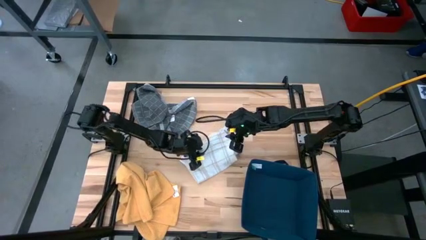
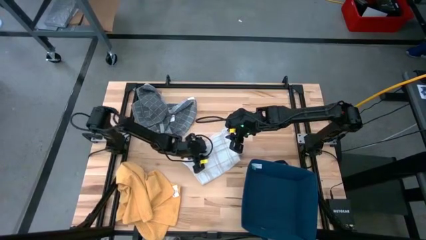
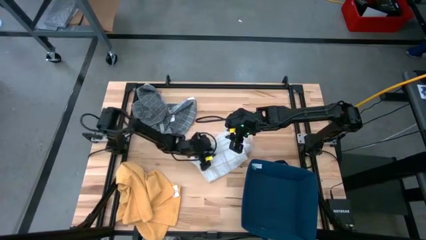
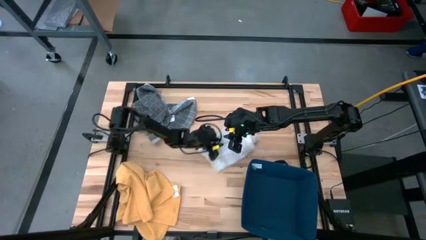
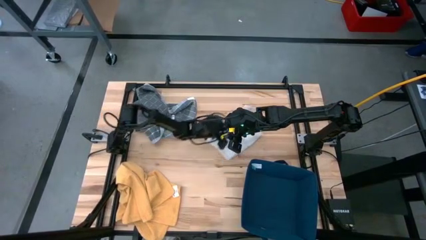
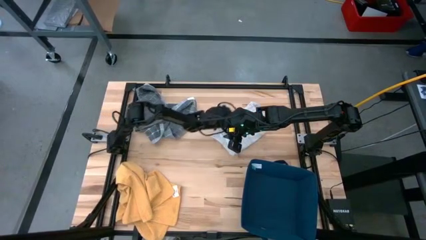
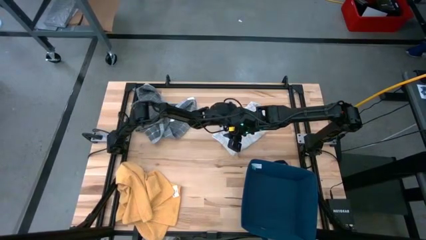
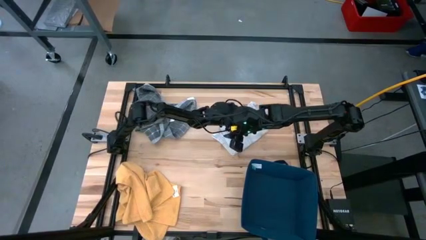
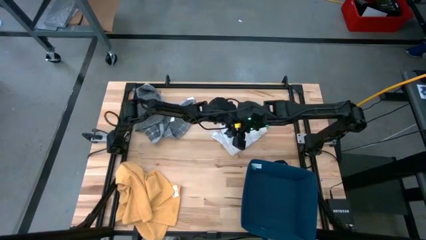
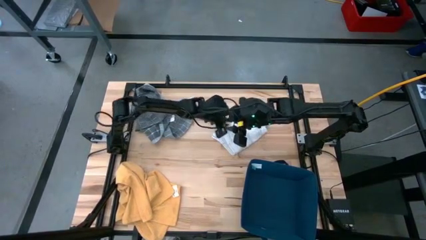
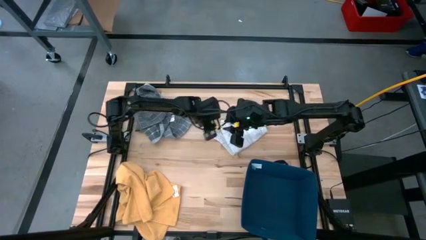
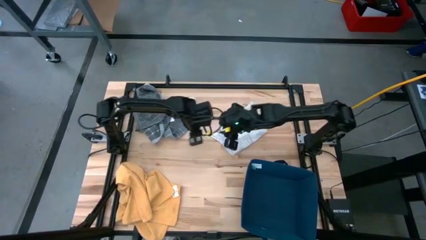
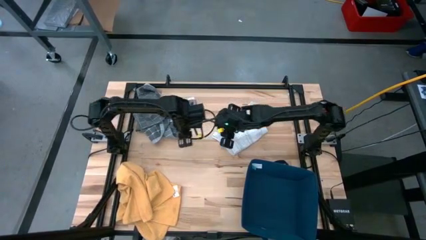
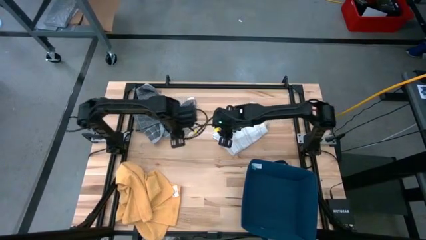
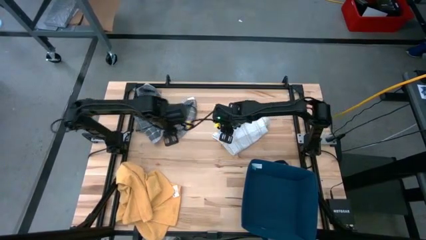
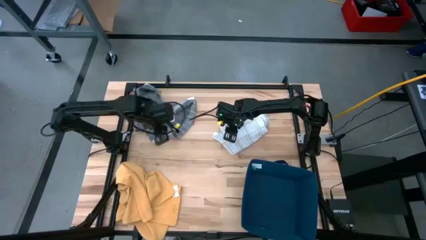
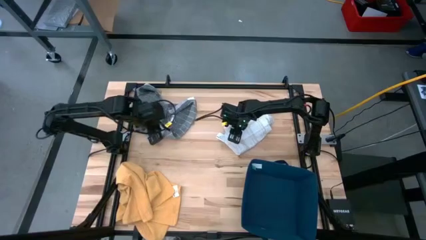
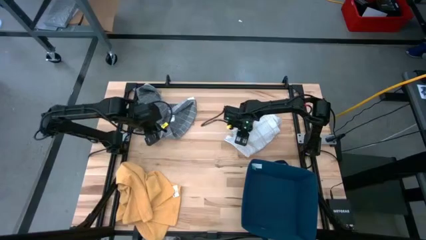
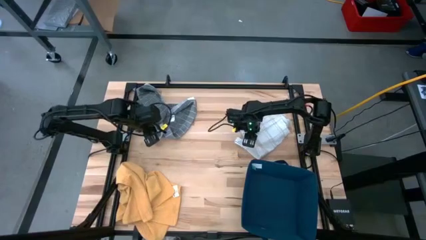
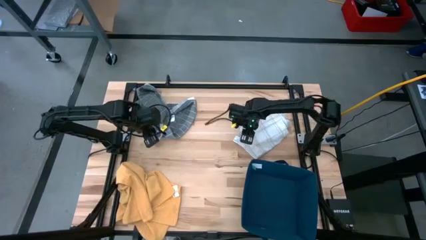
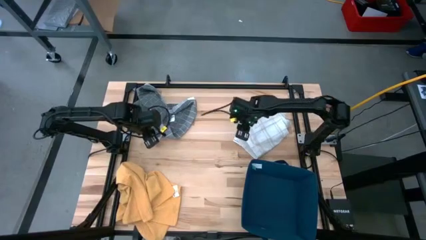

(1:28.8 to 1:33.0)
Task: Fold towel
Move the white kitchen towel to the top right of the table

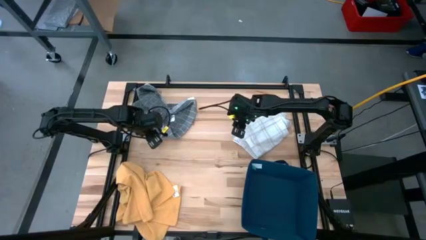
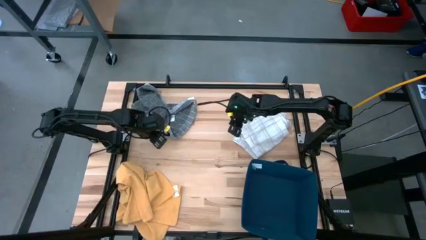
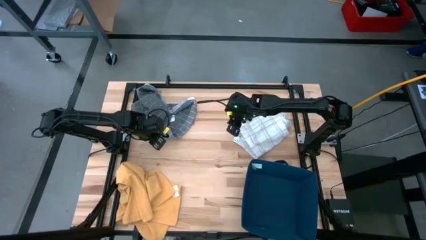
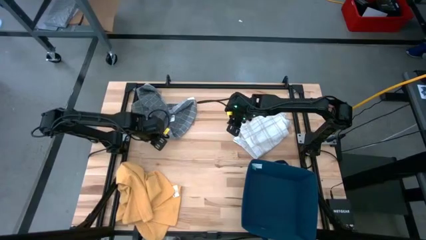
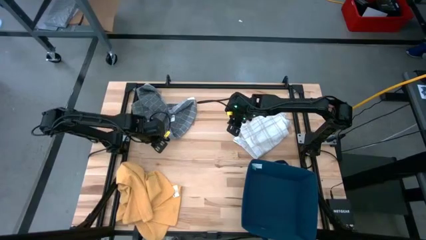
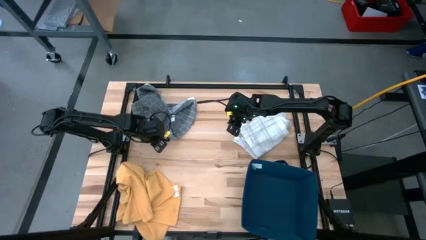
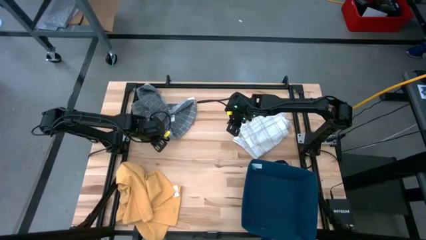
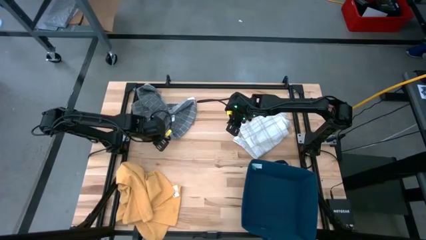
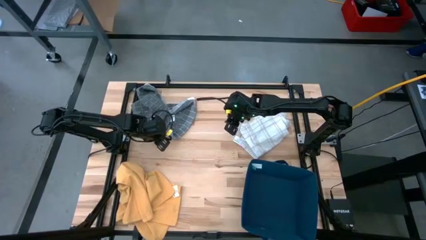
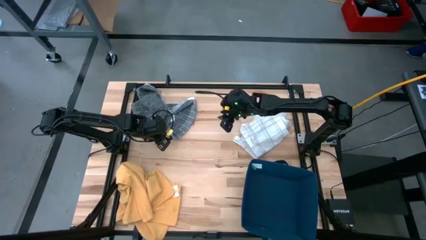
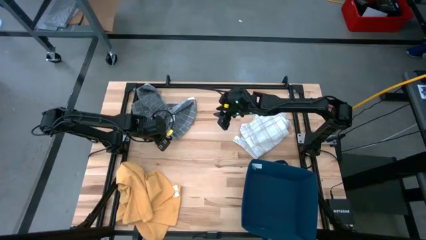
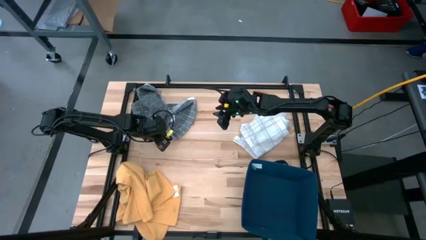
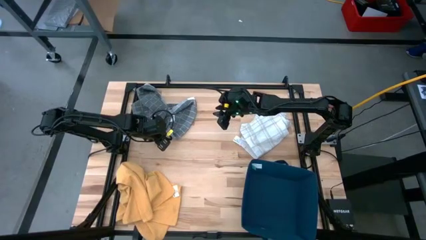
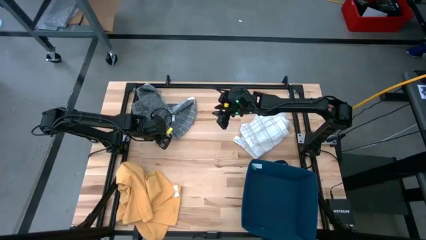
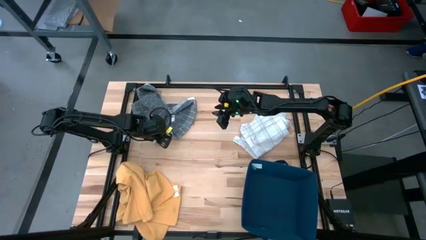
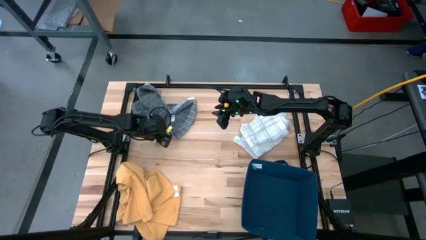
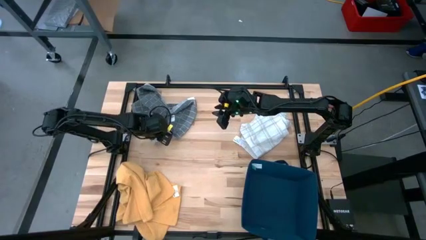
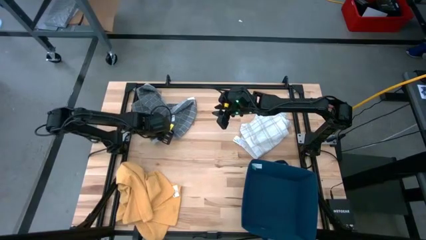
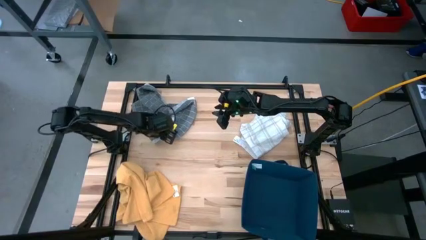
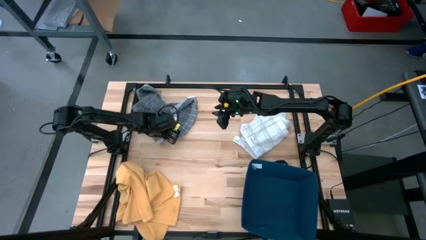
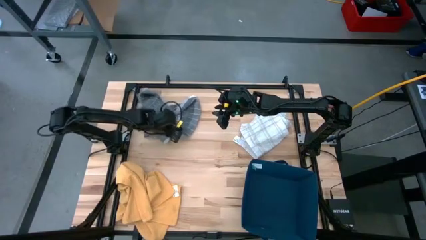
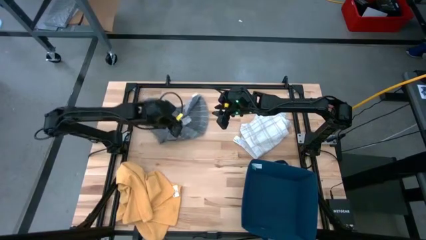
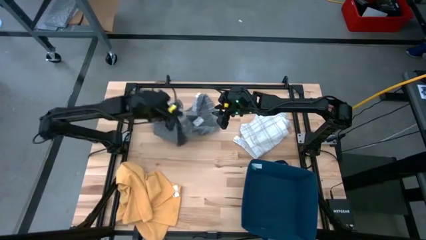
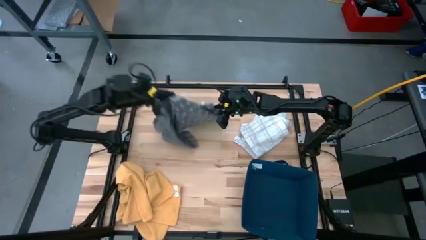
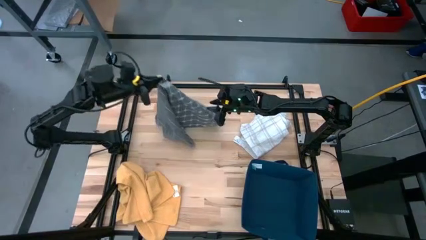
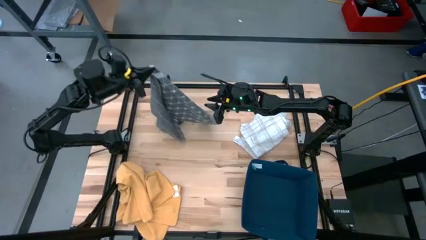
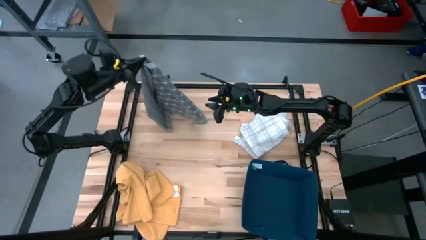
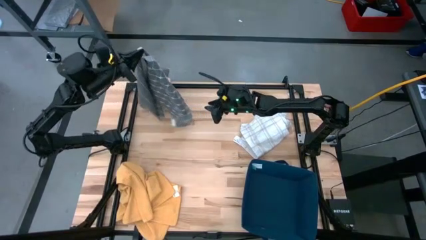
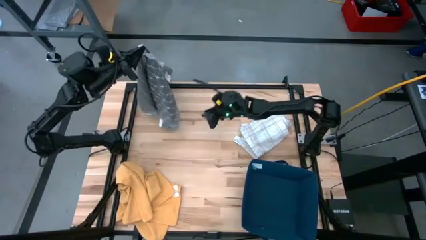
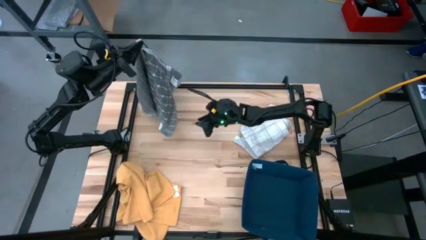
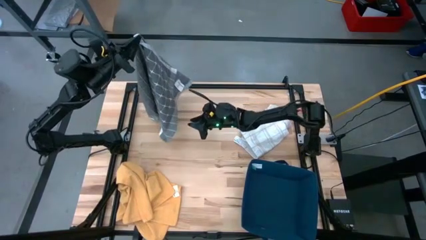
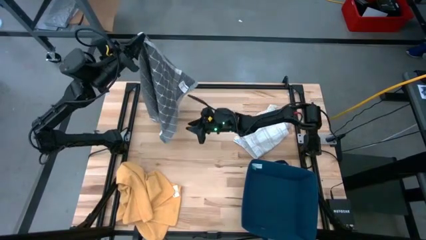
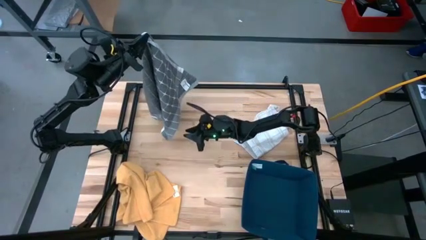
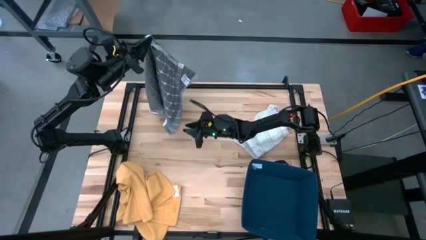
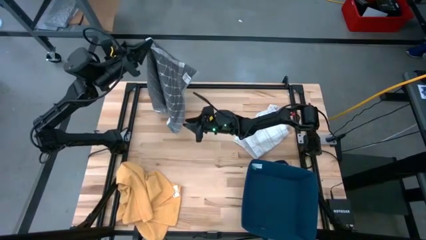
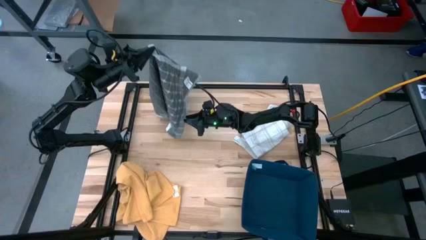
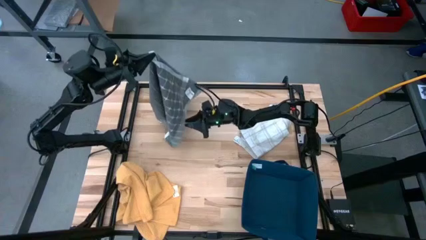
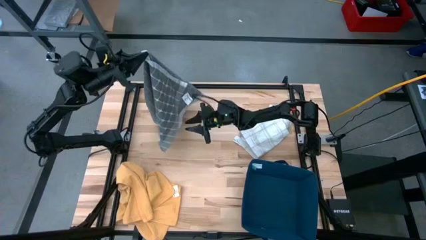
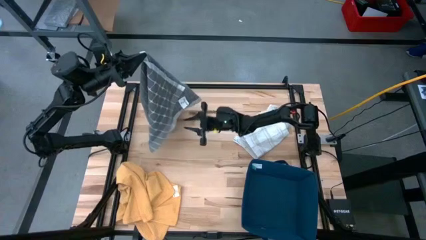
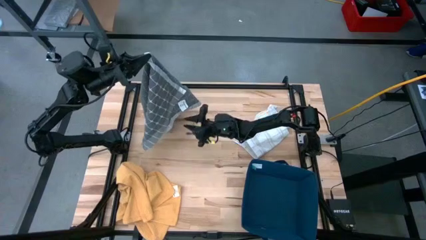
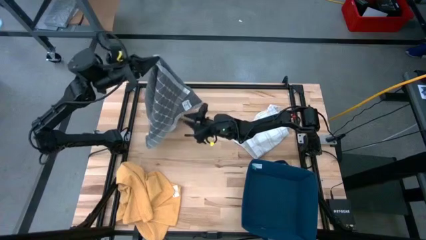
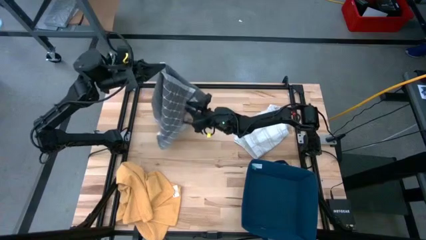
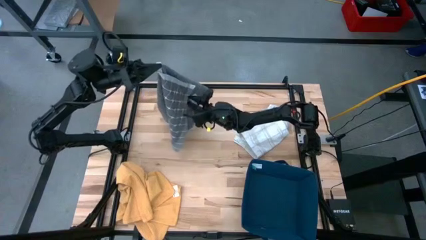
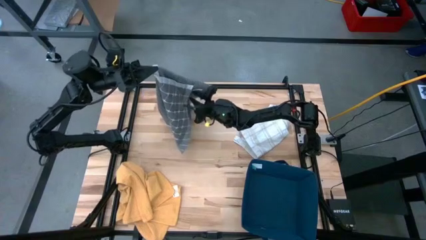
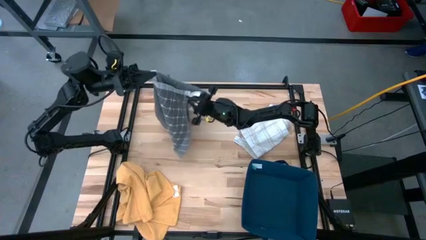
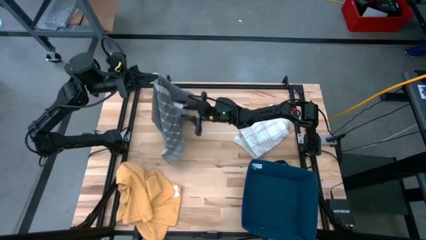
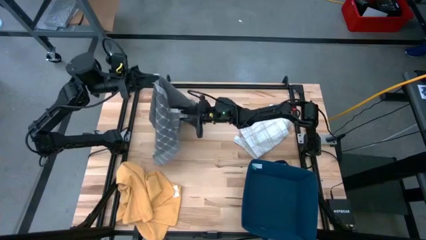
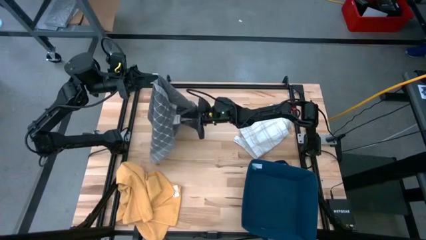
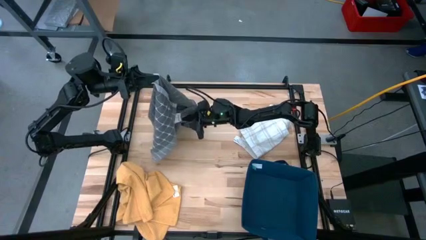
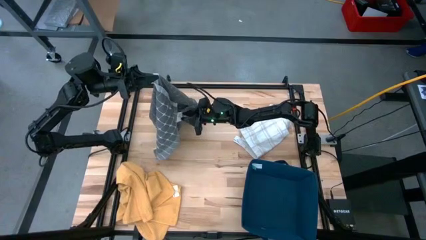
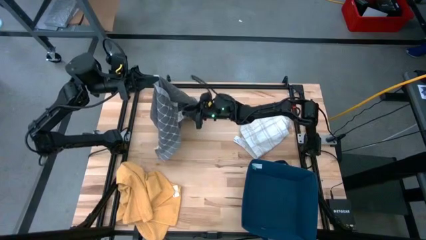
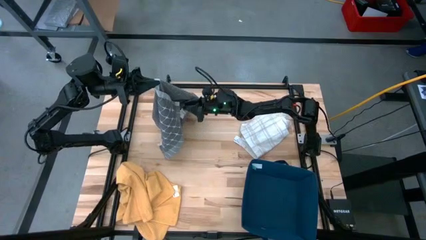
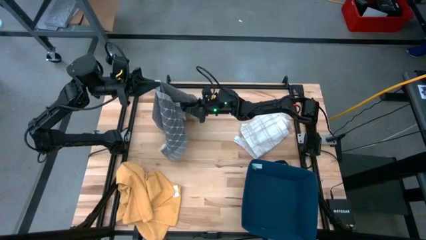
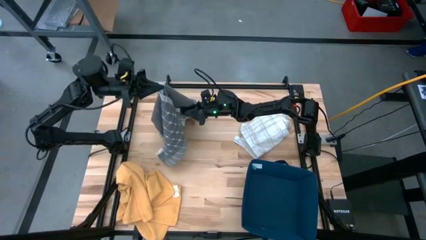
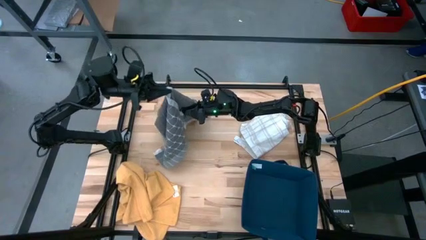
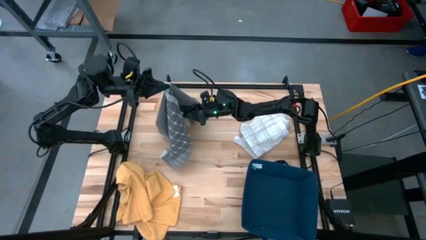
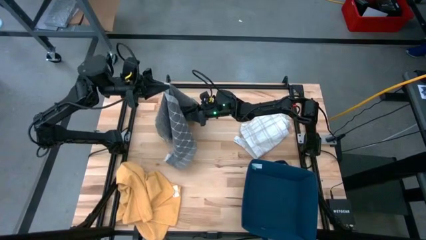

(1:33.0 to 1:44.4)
Fold the gray kitchen towel
